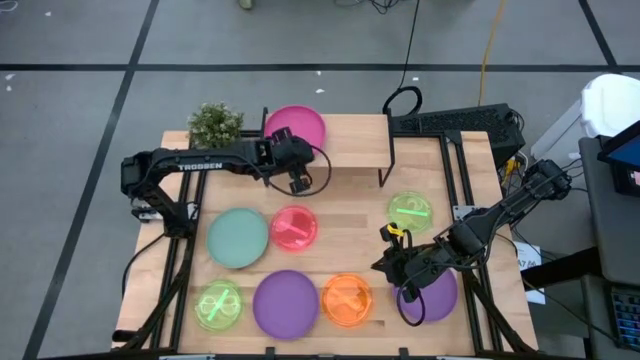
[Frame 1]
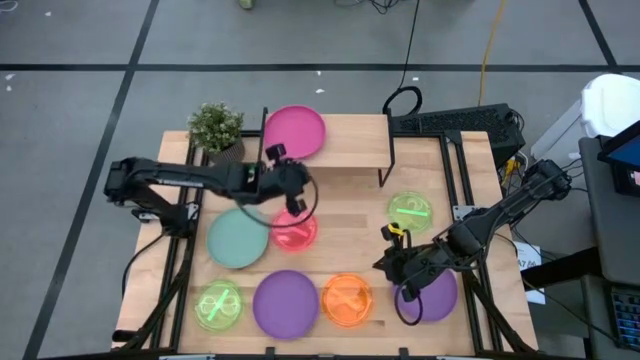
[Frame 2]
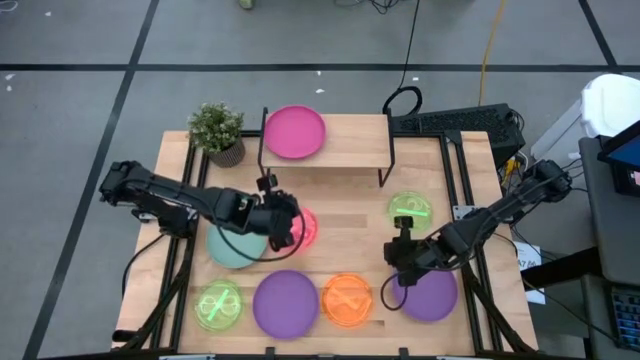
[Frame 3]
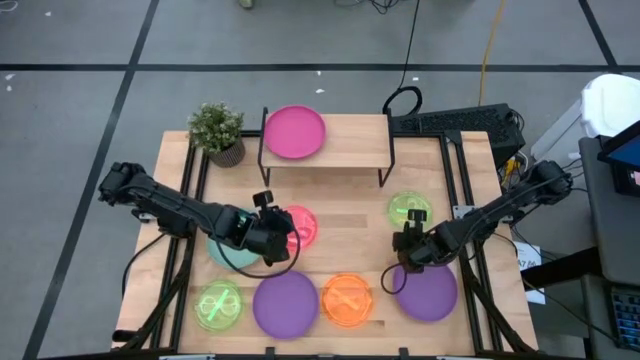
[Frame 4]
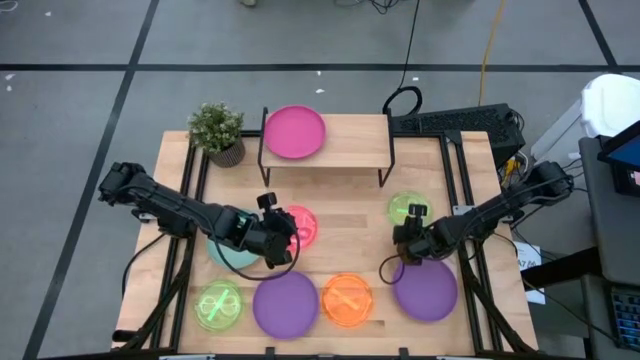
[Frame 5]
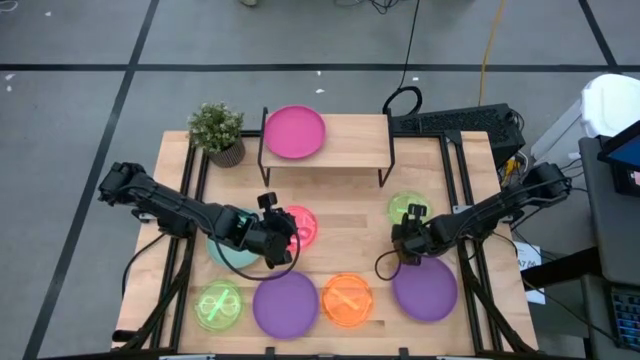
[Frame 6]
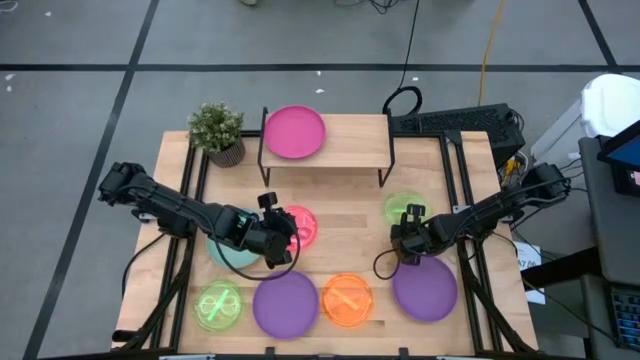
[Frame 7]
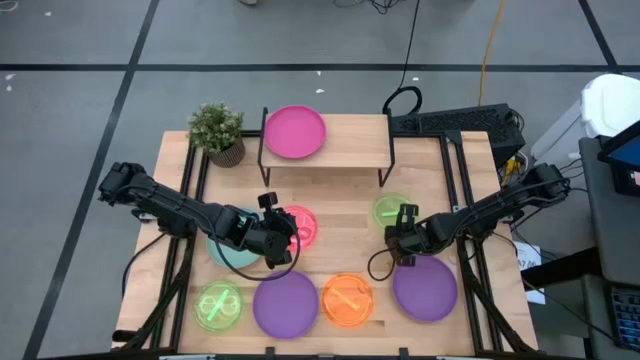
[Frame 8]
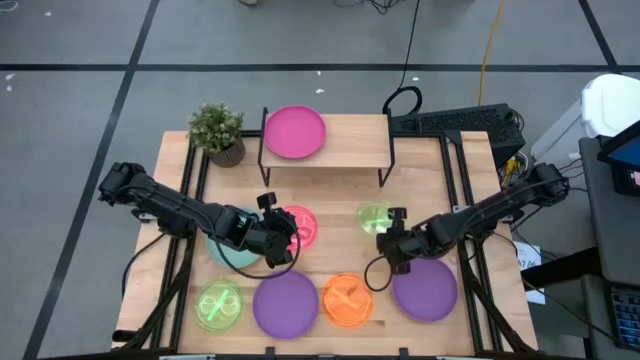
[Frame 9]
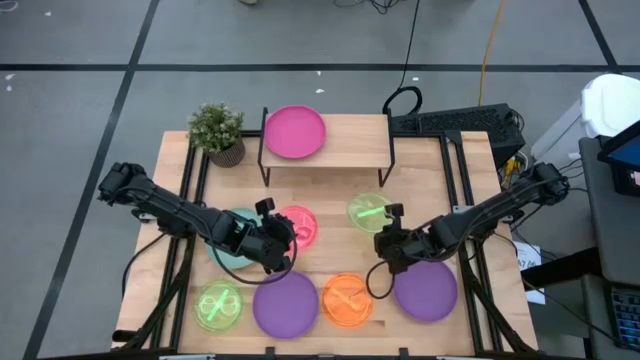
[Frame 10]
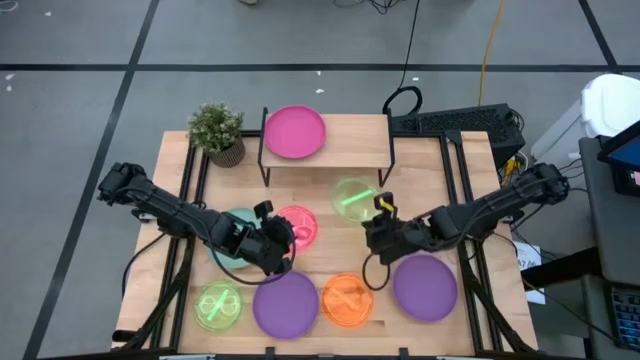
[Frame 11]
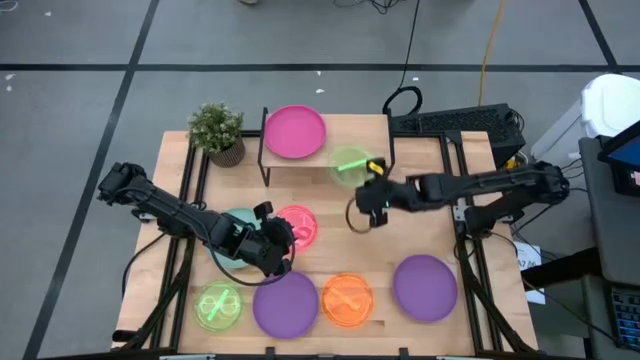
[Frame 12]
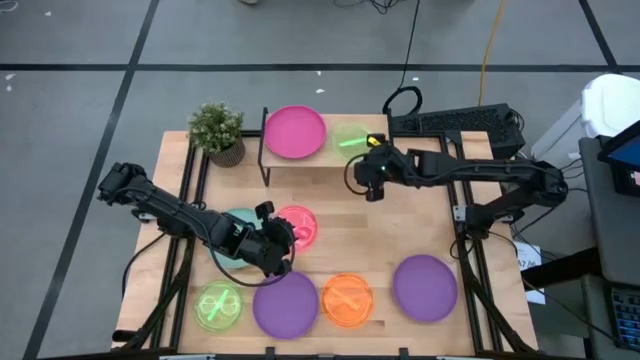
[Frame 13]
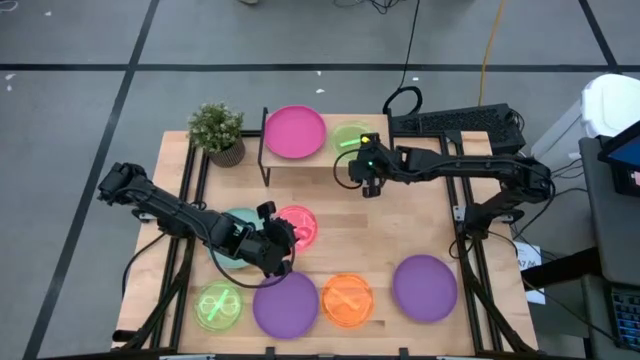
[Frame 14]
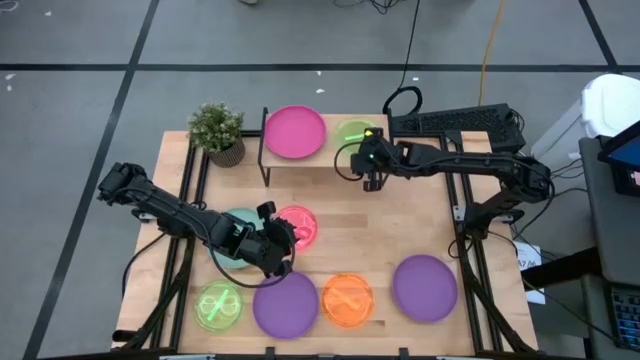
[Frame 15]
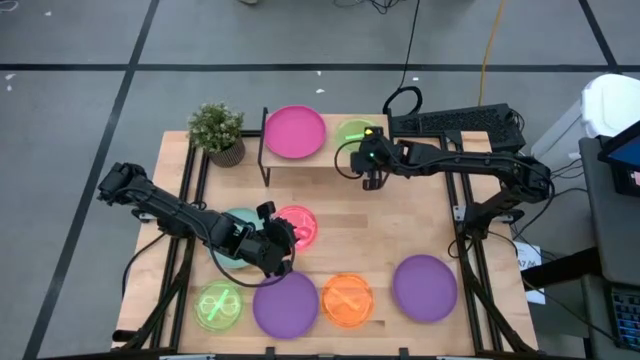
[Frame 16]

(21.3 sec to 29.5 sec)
Task: Place and stack plates onto a shelf
Put the transparent green plate on the shelf

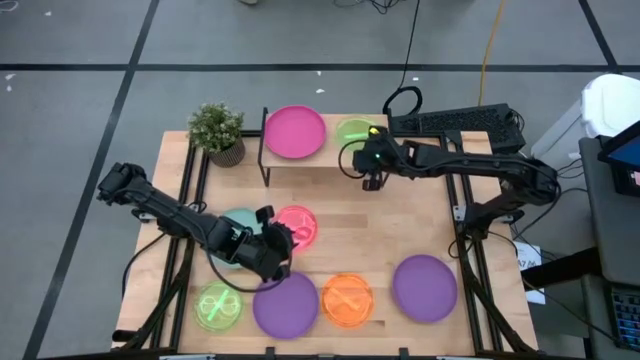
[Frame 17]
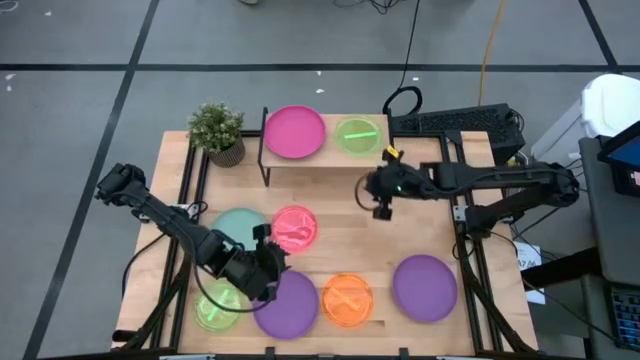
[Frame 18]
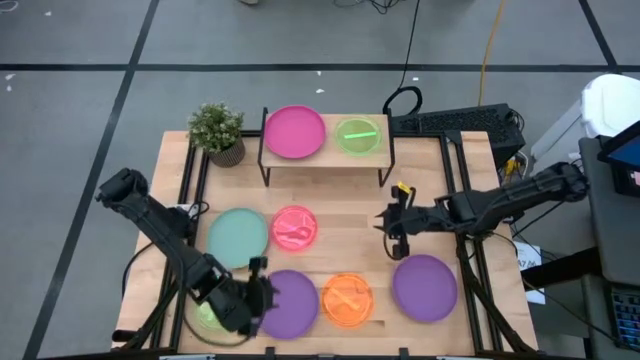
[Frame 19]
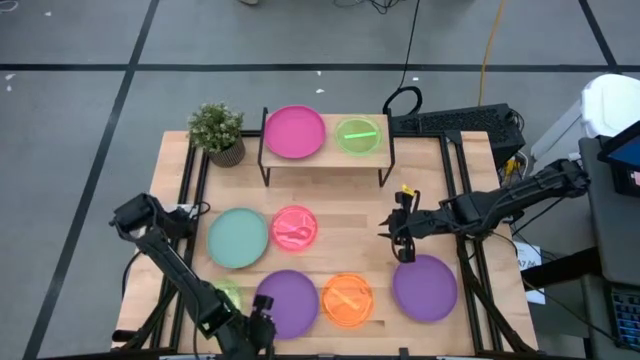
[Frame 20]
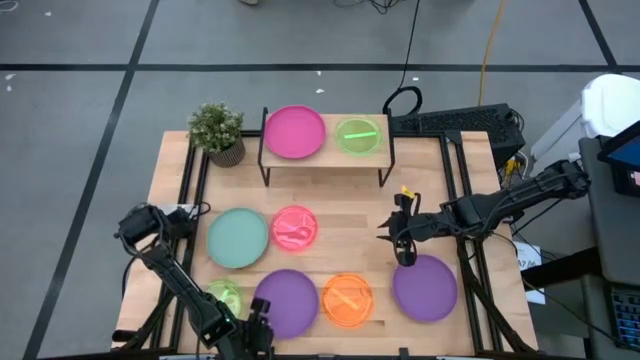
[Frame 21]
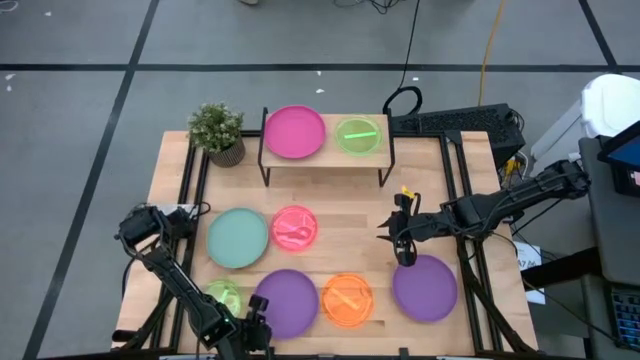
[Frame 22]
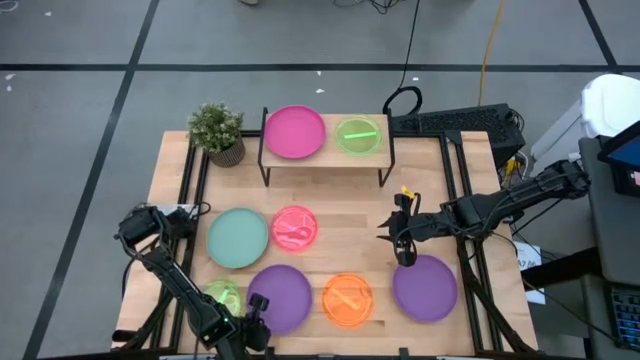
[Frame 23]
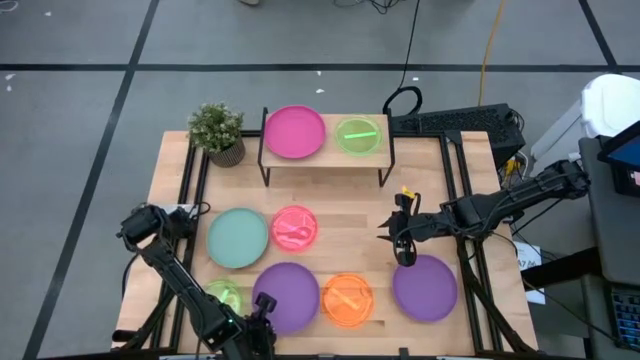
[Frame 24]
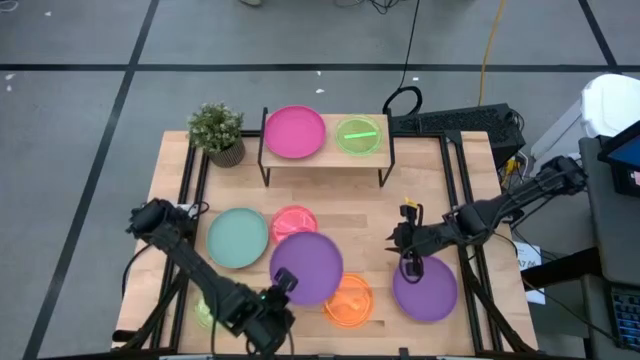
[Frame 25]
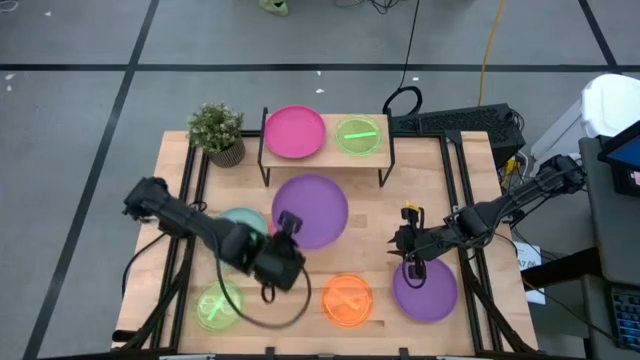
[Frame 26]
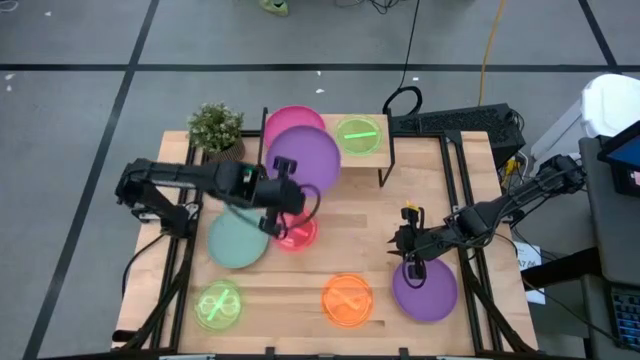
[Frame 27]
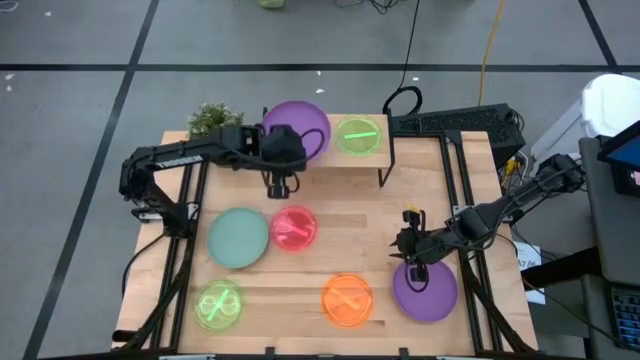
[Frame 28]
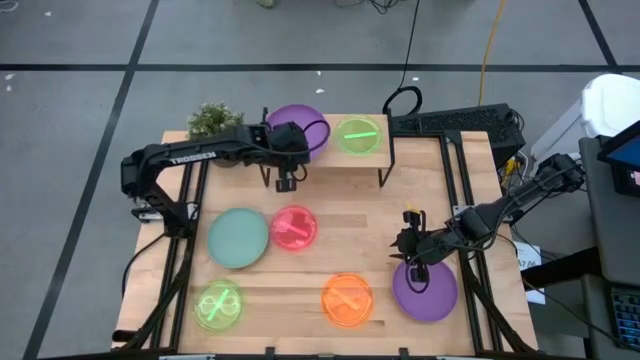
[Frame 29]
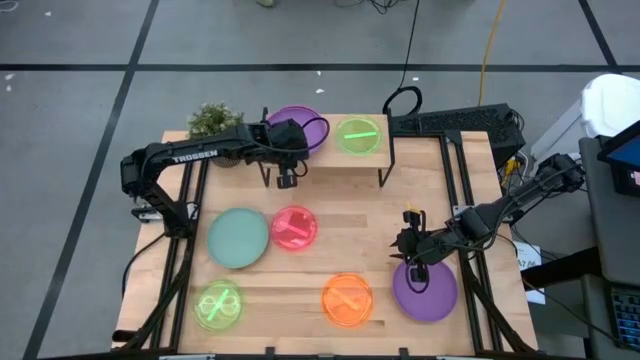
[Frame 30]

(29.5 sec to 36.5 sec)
Stack the purple plate on top of the pink plate on the shelf

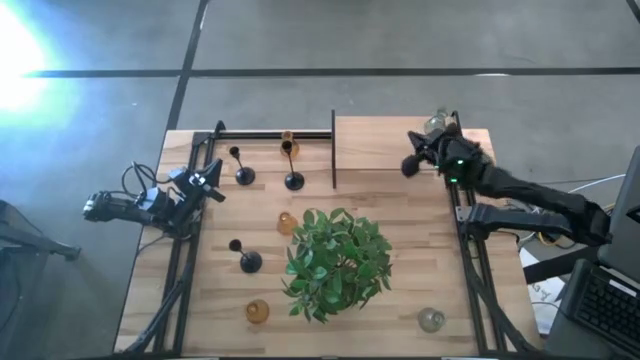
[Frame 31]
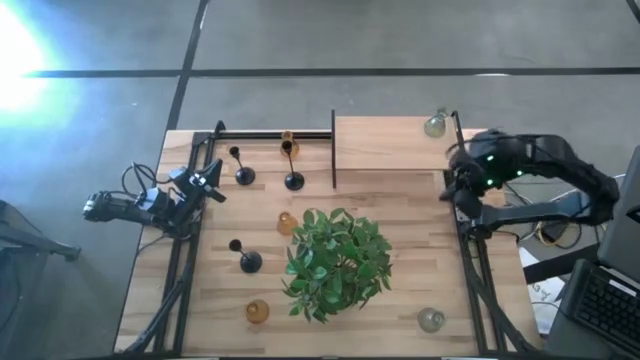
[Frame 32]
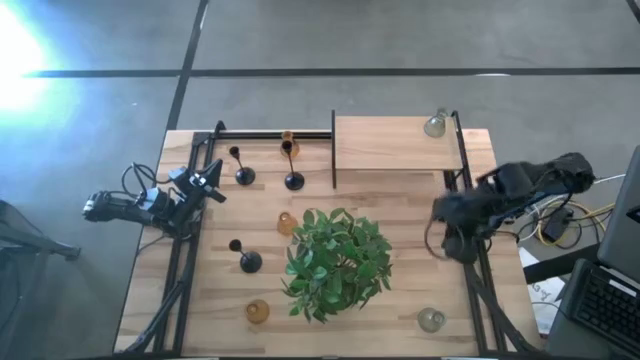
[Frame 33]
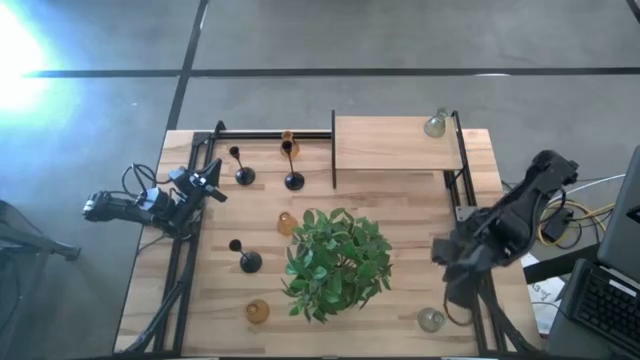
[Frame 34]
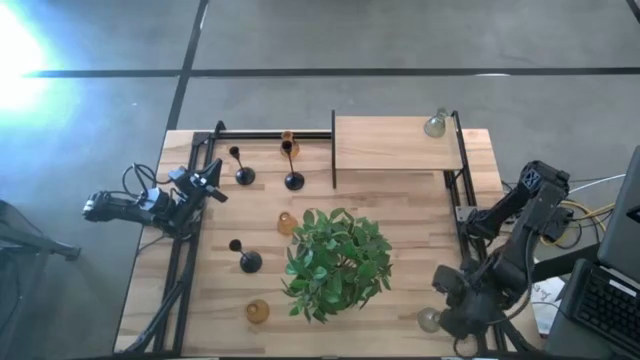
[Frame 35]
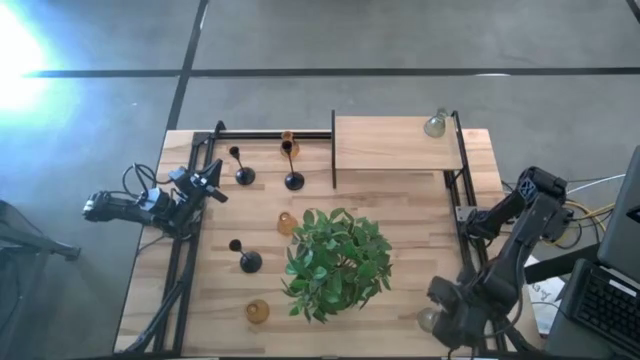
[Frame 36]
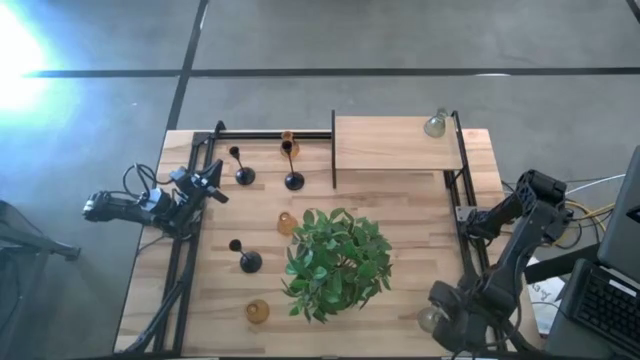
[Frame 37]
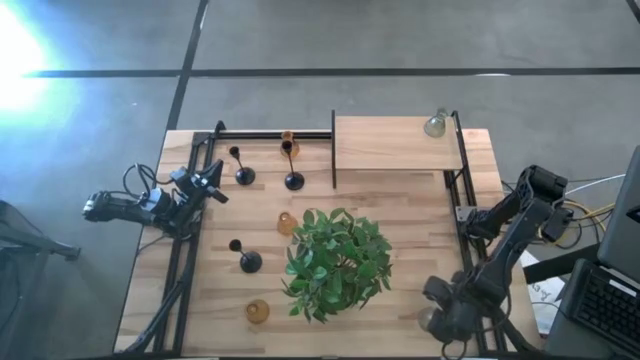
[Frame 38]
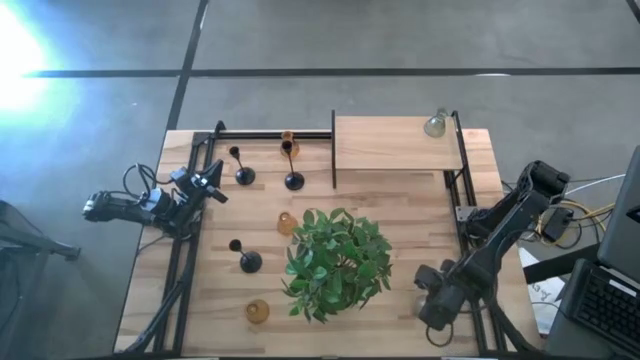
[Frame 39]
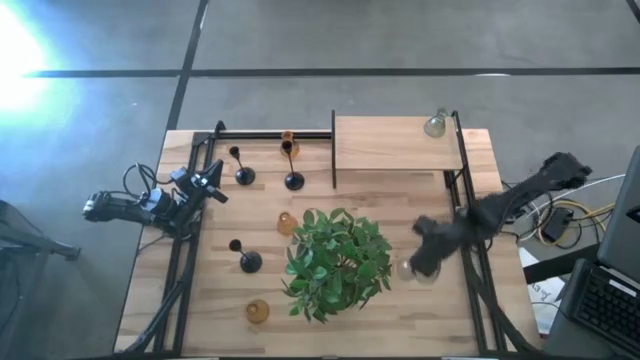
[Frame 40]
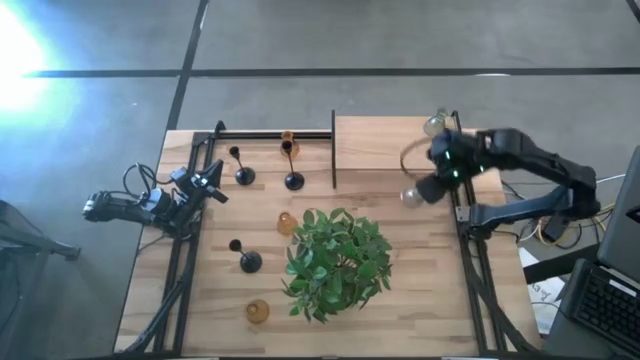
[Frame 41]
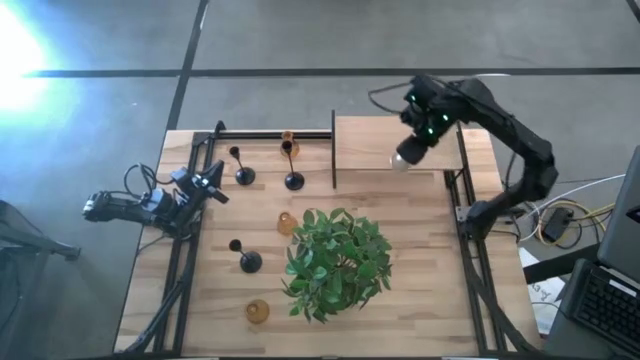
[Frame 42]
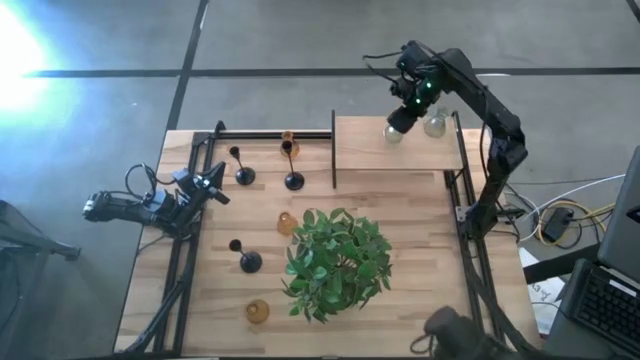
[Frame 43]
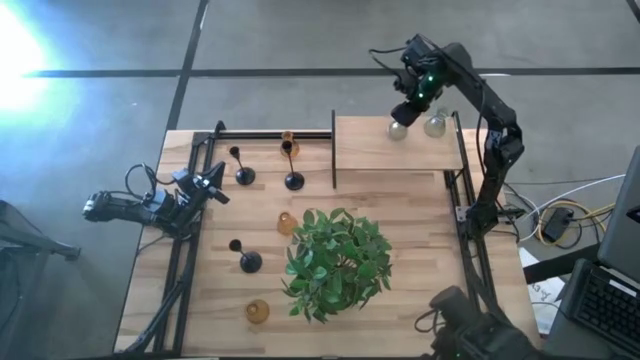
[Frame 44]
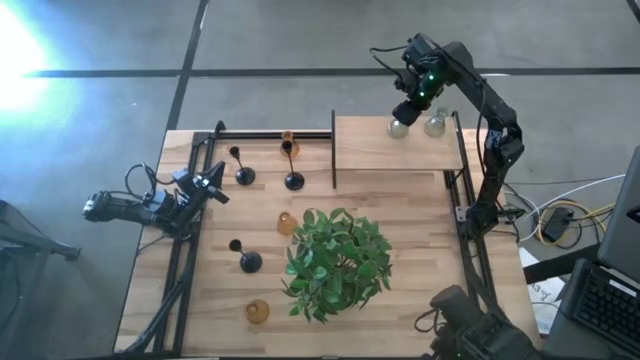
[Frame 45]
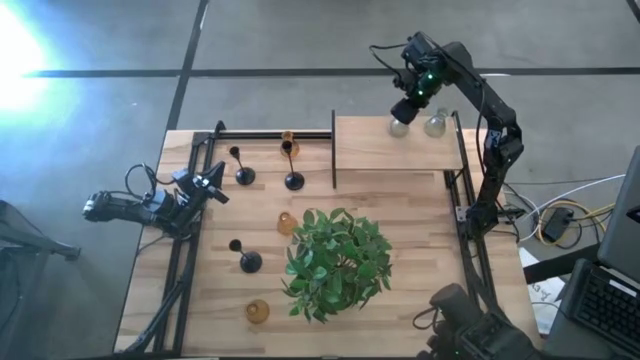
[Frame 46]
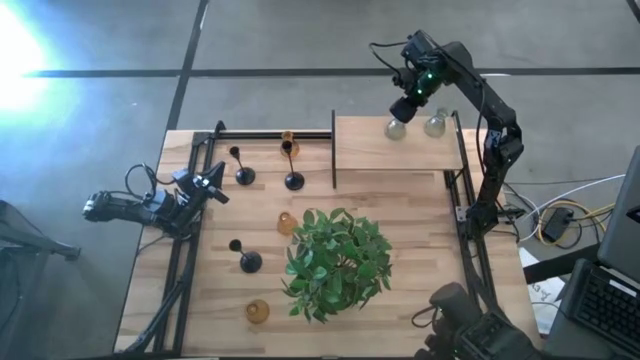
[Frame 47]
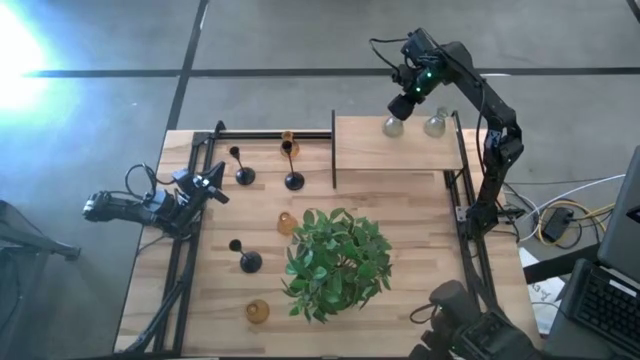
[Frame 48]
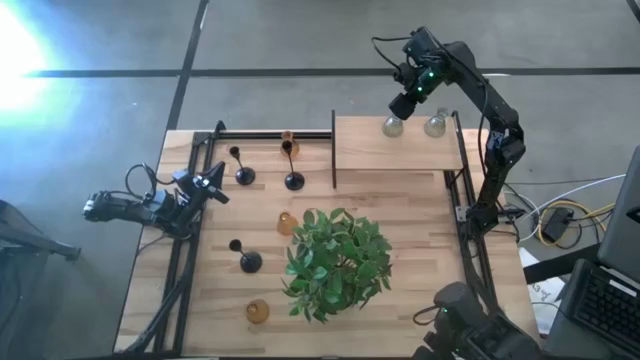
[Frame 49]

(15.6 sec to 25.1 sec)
Task: Pick & Place candle stick holders
Put the bottom transparent glass candle holder on the shelf
